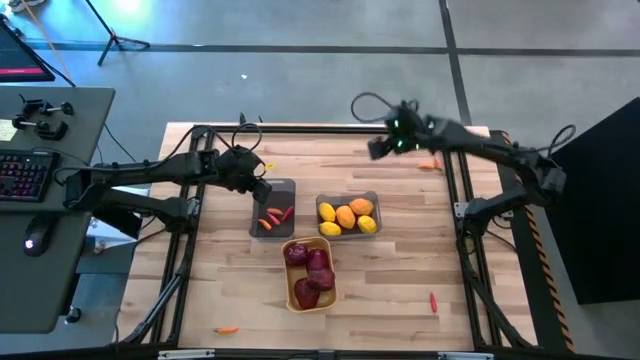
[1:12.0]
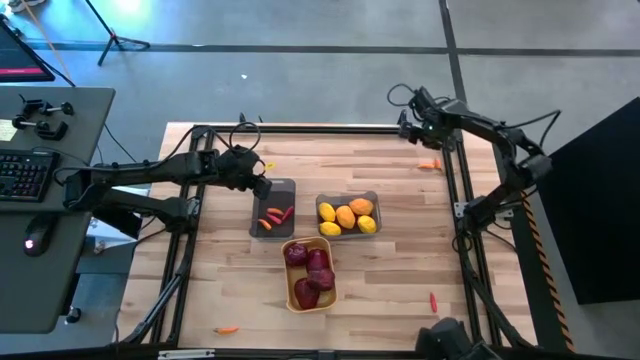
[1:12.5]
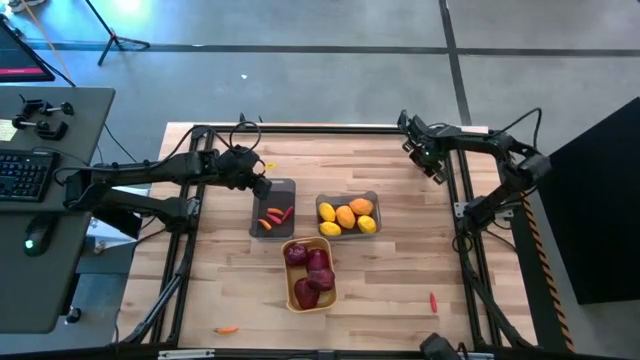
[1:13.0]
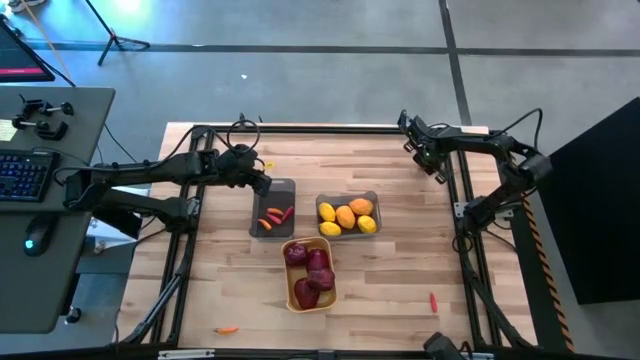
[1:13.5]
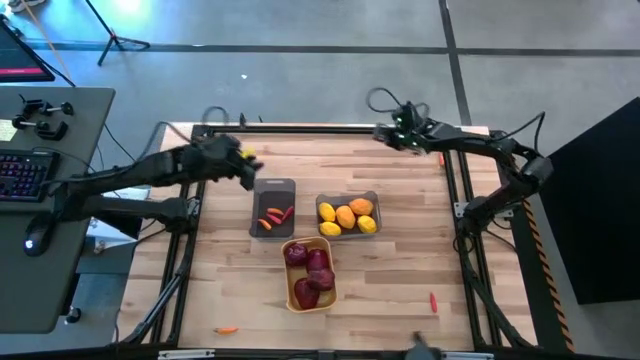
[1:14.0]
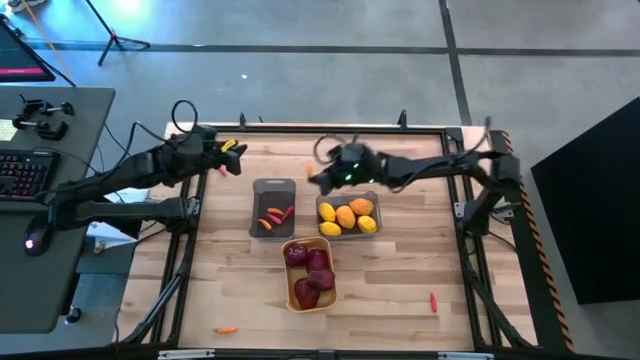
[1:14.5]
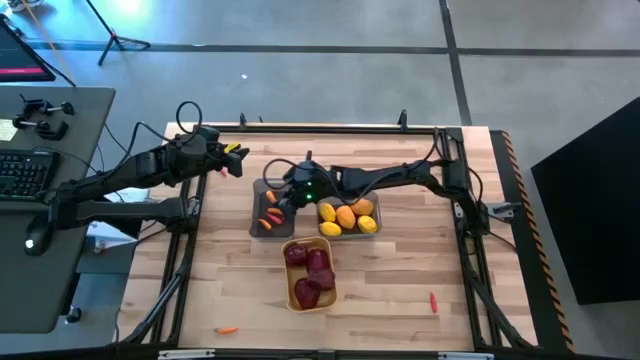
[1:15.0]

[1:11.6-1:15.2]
Task: Sort produce into baskets
Put the yellow chili pepper into the left black bin

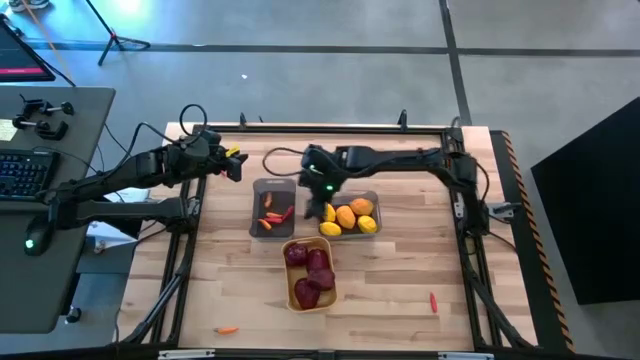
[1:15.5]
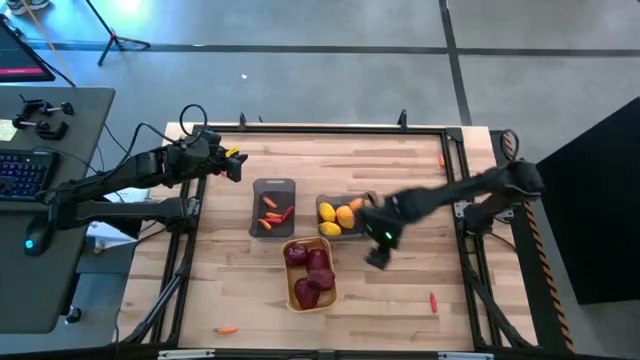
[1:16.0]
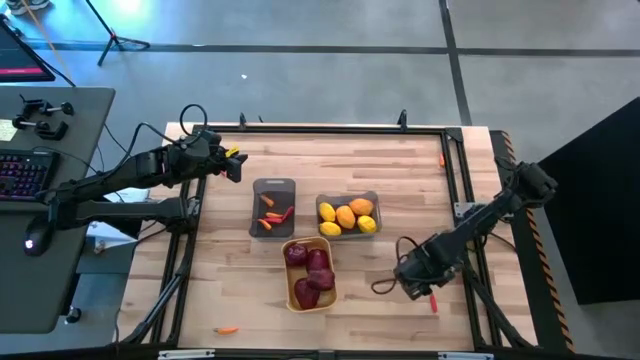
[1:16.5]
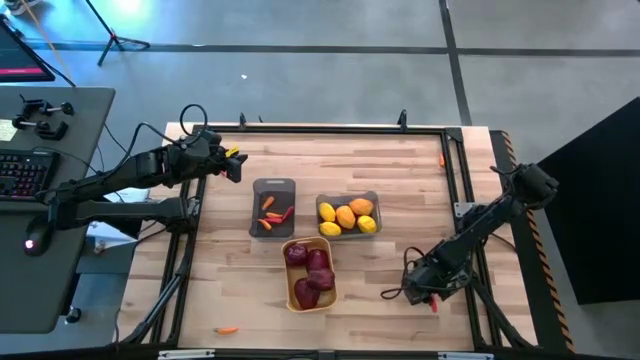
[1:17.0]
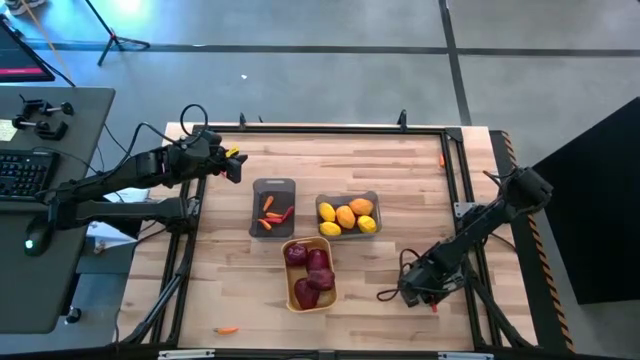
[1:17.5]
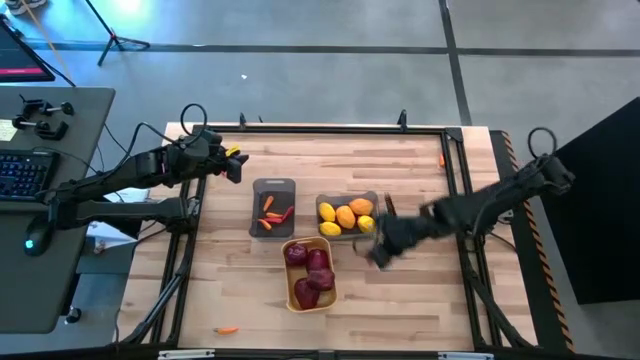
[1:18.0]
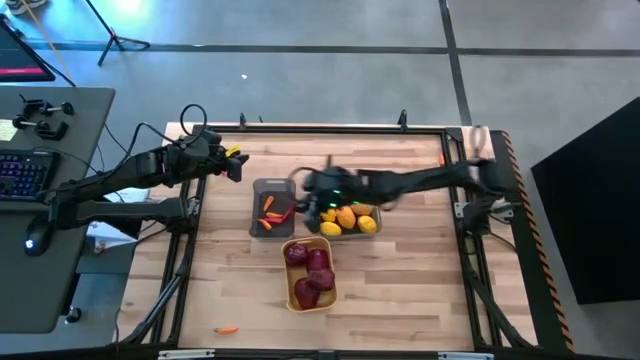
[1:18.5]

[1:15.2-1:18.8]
Put the orange chili pepper into the left black bin

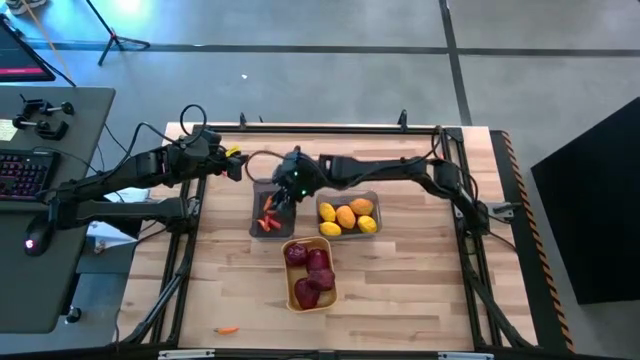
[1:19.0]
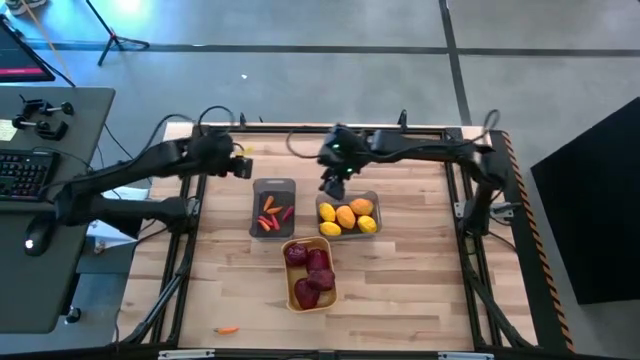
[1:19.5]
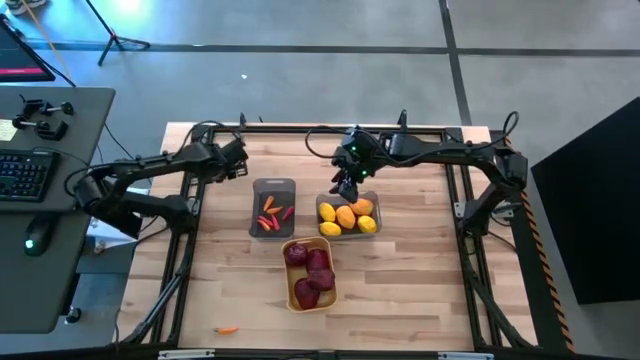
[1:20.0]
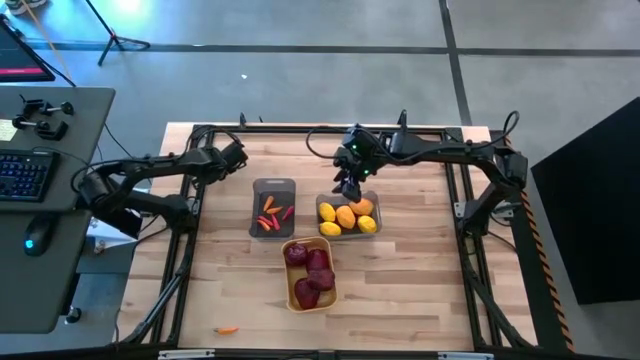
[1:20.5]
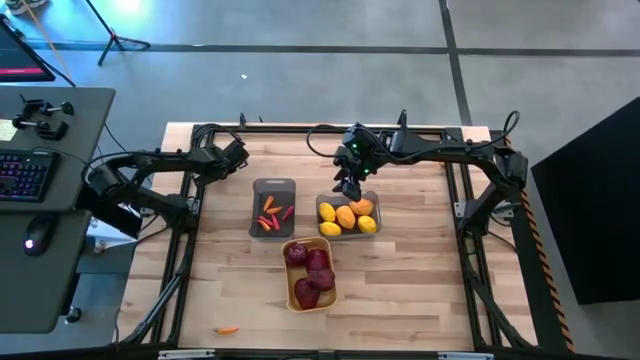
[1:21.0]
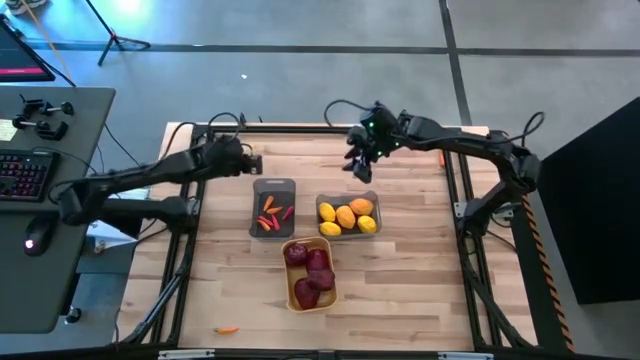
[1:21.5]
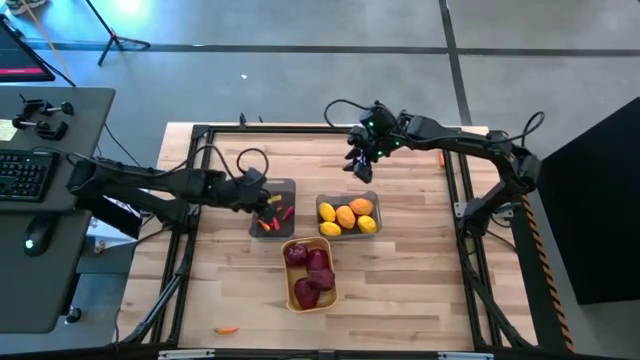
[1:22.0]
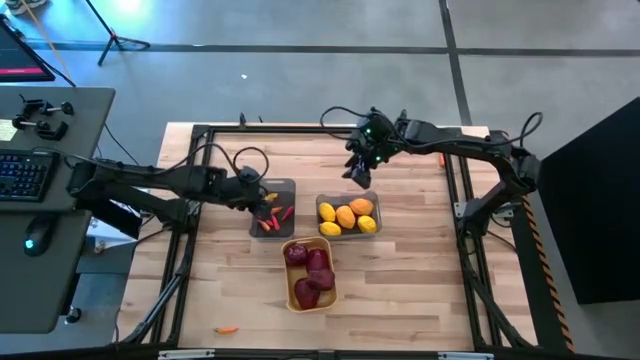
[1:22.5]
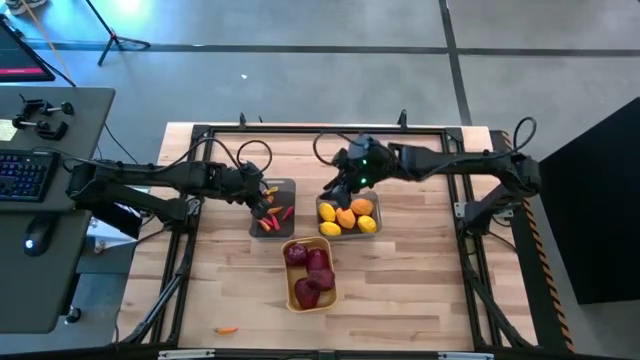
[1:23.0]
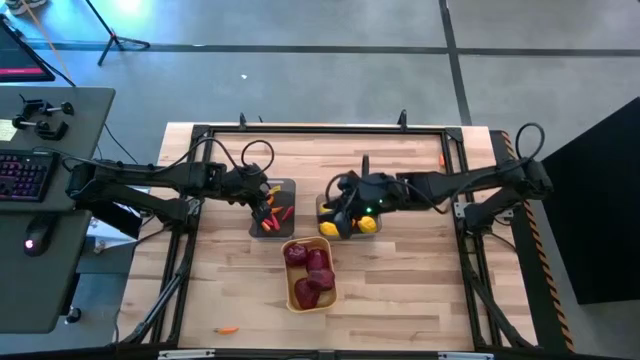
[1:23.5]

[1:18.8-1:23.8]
Put the orange chili pepper into the left black bin

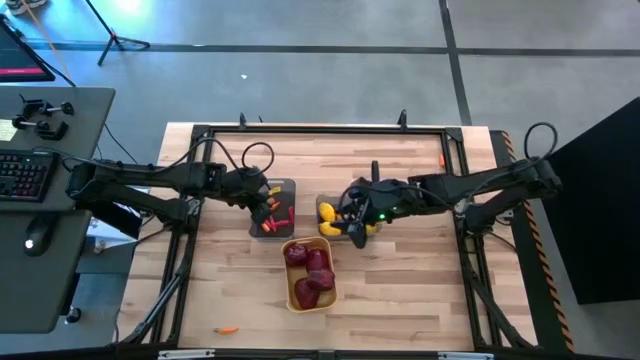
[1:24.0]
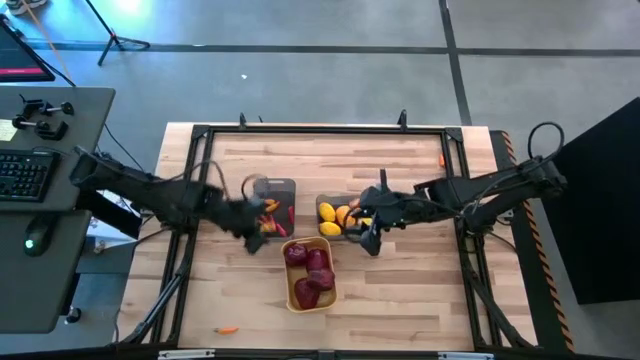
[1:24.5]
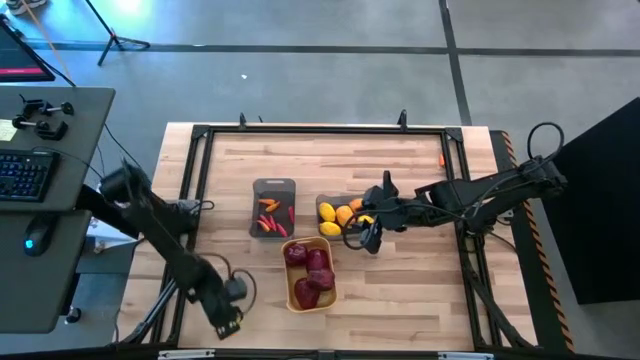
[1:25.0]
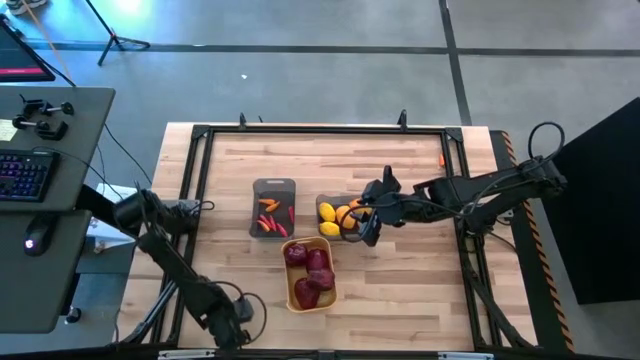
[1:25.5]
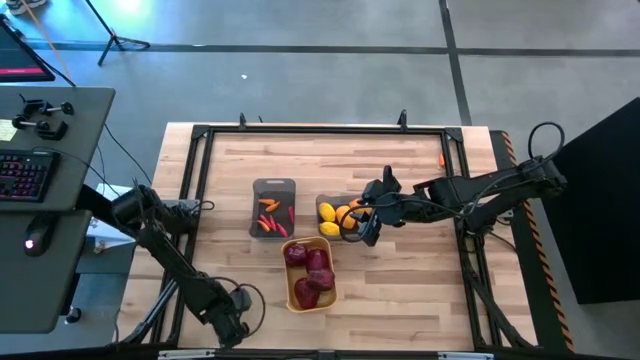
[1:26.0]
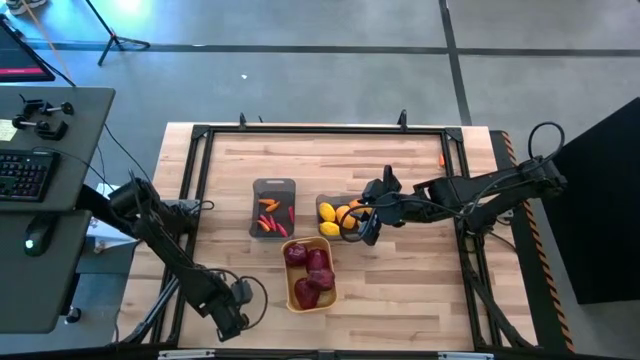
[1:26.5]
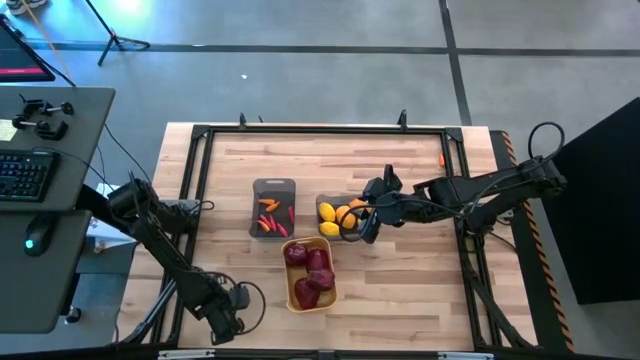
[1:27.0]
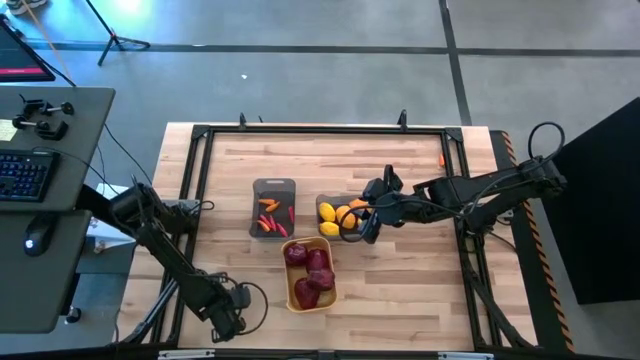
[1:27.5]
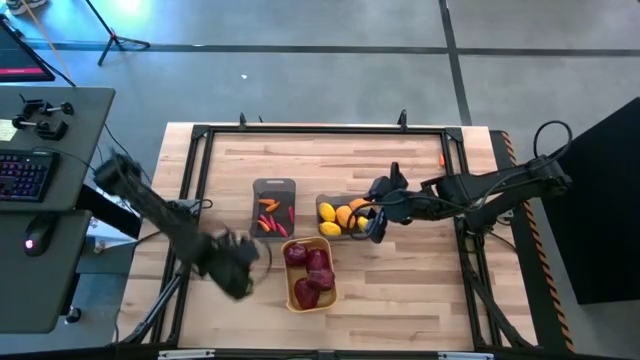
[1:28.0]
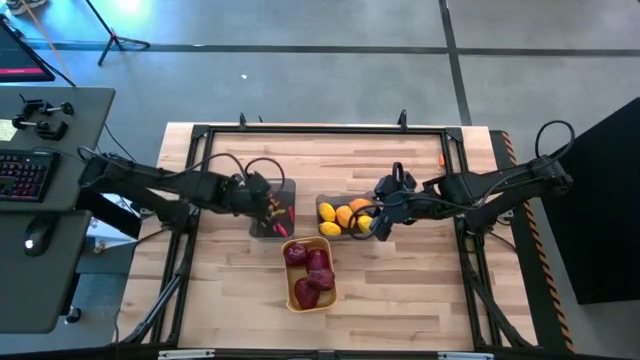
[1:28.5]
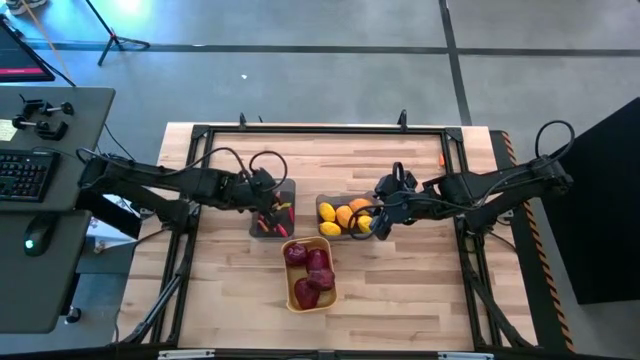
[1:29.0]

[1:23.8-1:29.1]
Put the yellow chili pepper into the left black bin

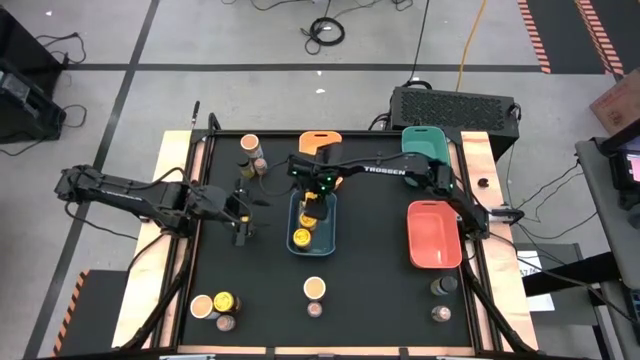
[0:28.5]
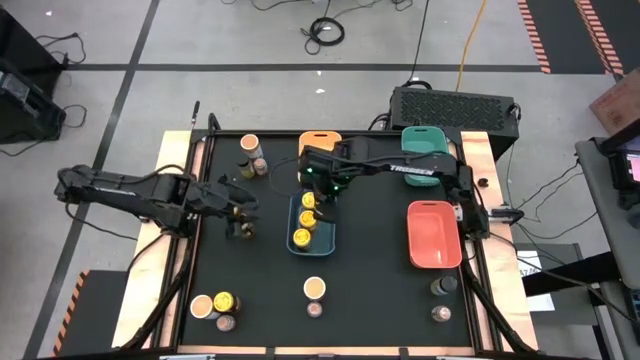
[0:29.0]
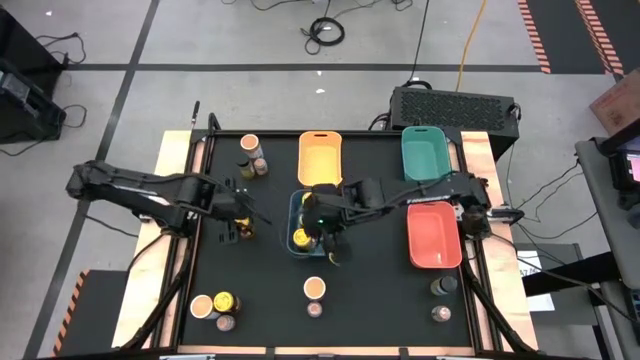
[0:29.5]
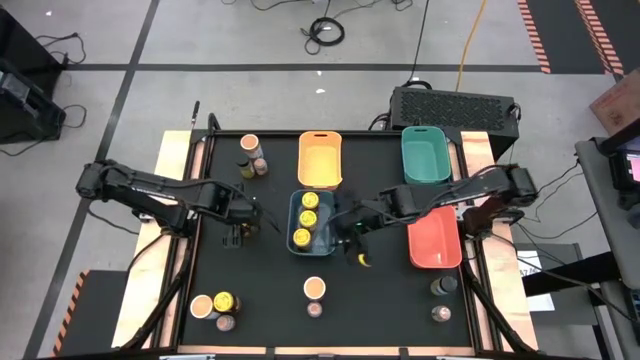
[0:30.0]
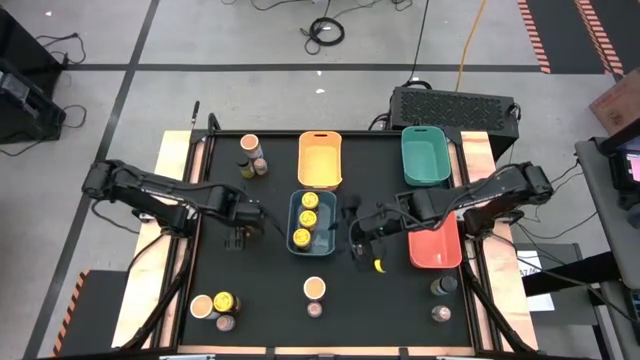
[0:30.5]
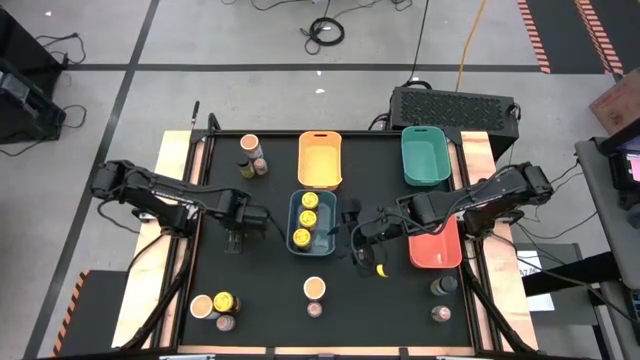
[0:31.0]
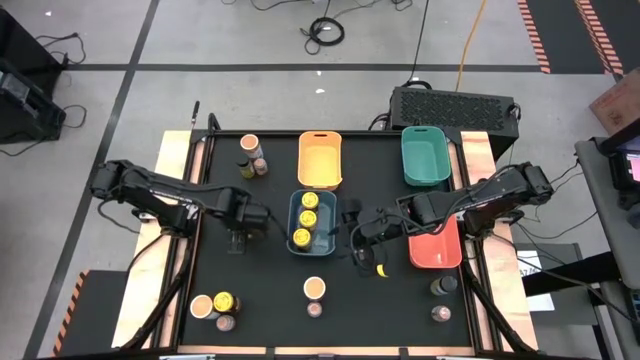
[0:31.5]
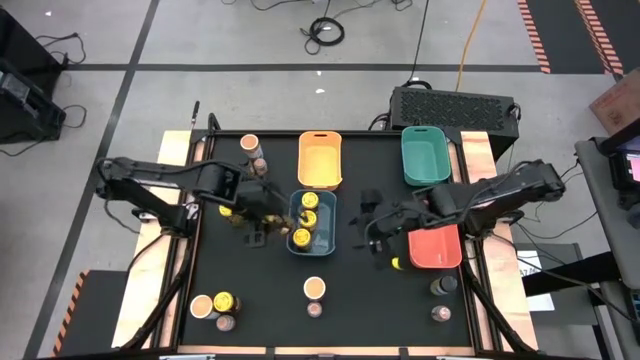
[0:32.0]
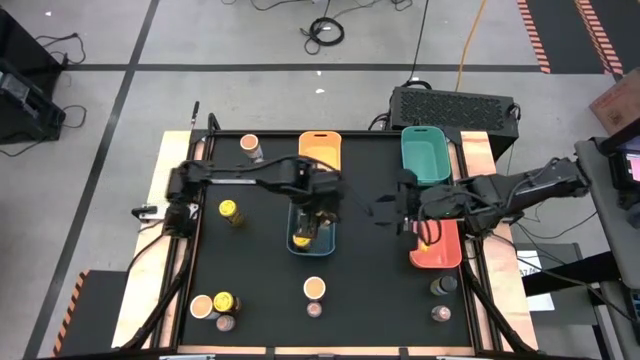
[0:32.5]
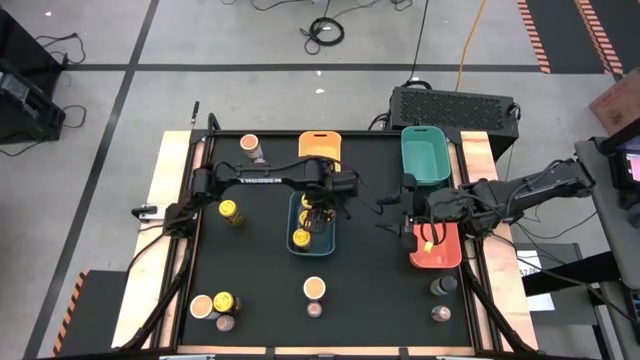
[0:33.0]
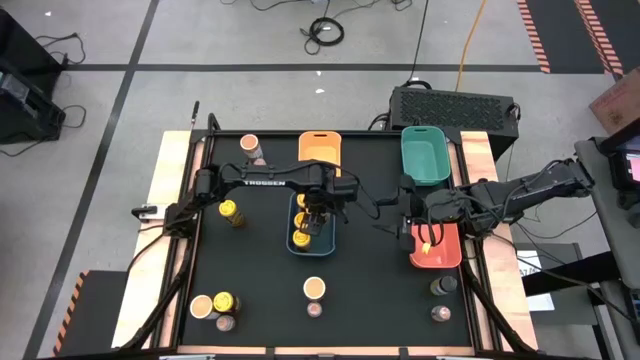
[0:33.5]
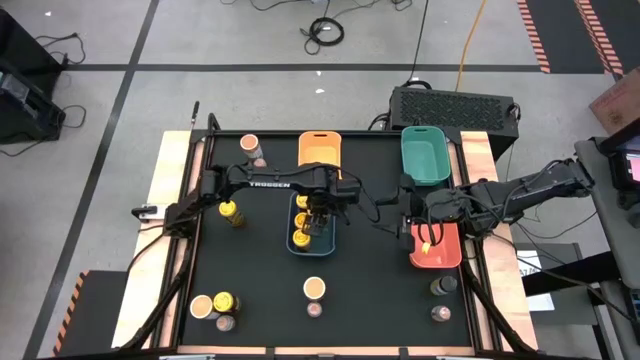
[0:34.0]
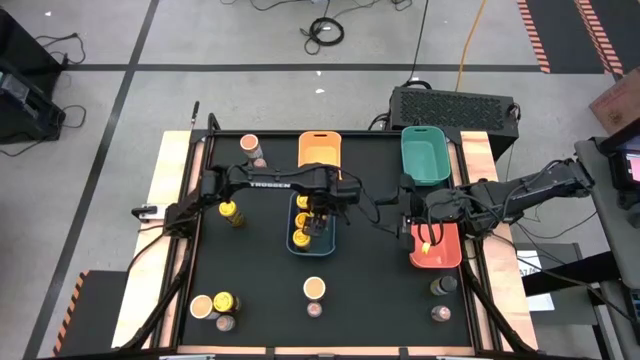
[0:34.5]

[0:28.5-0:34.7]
Task: Sort spices by type
Put the yellow seasoning bottle into the dark blue bin
